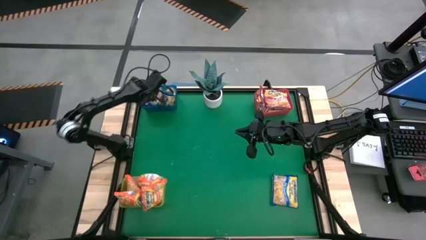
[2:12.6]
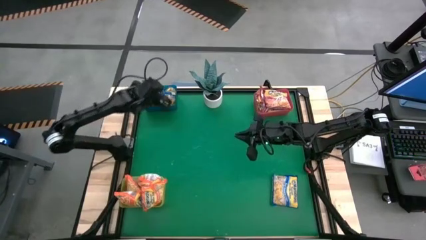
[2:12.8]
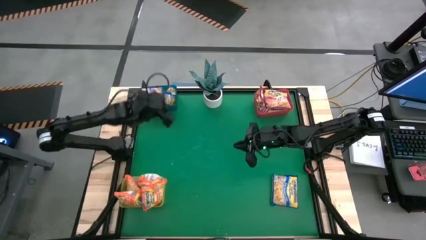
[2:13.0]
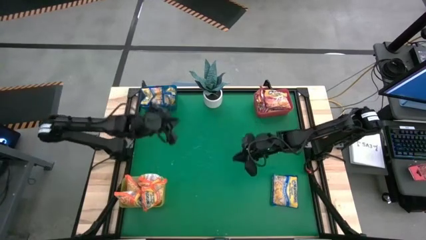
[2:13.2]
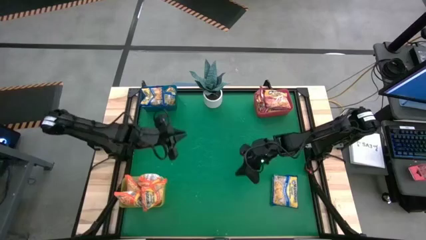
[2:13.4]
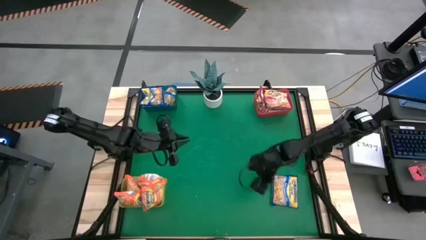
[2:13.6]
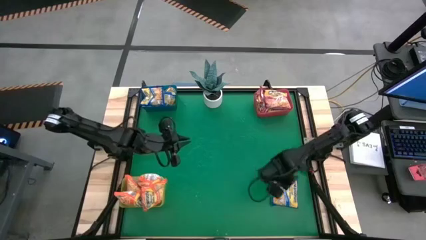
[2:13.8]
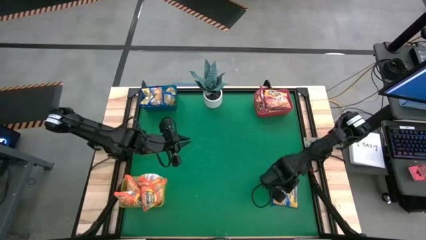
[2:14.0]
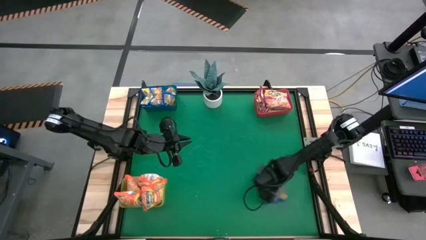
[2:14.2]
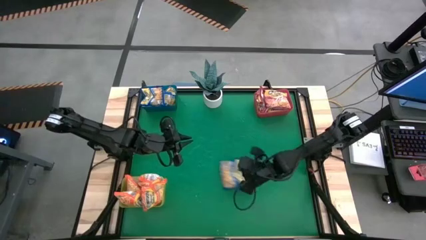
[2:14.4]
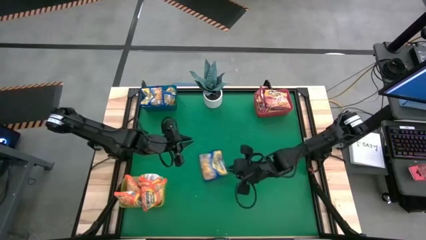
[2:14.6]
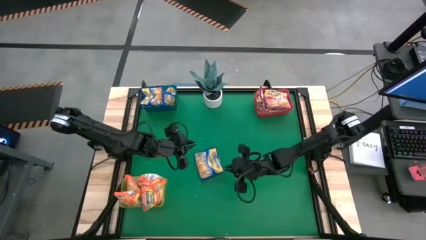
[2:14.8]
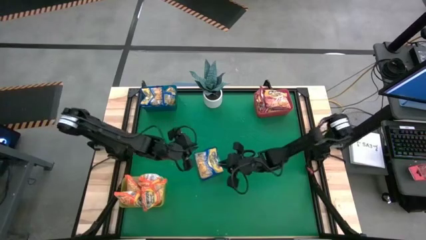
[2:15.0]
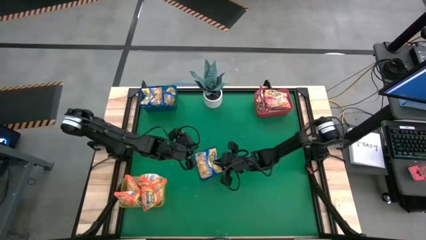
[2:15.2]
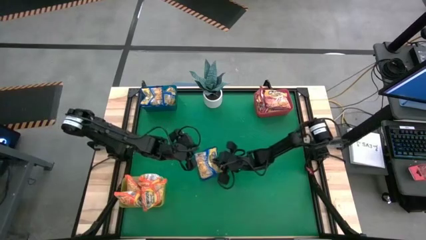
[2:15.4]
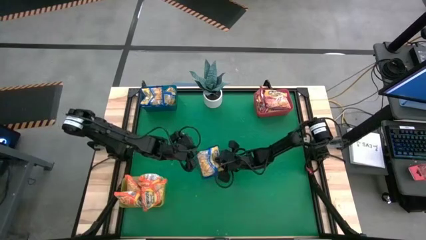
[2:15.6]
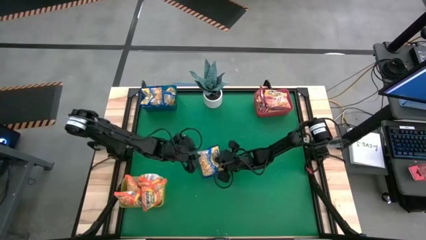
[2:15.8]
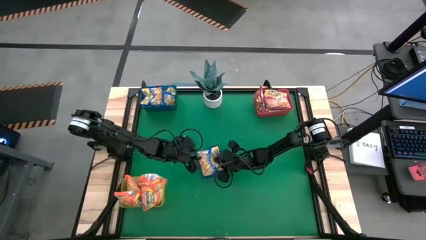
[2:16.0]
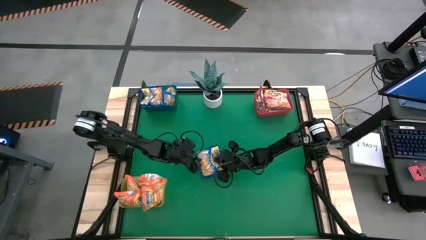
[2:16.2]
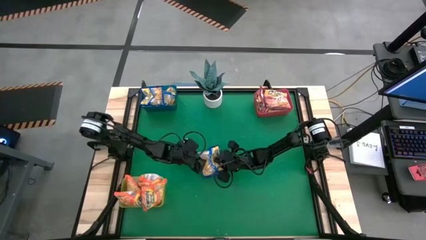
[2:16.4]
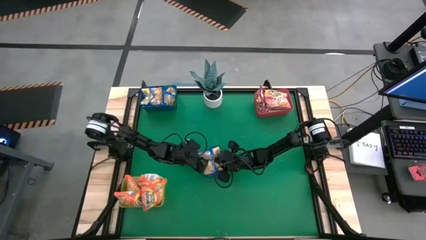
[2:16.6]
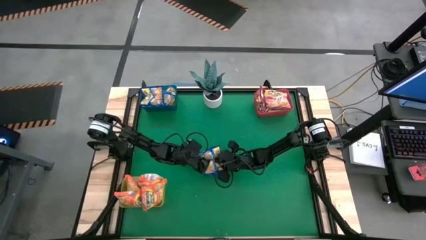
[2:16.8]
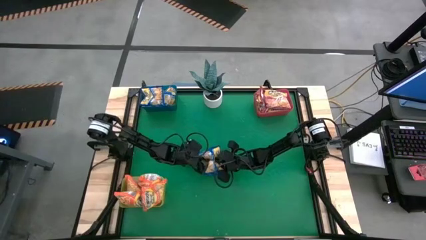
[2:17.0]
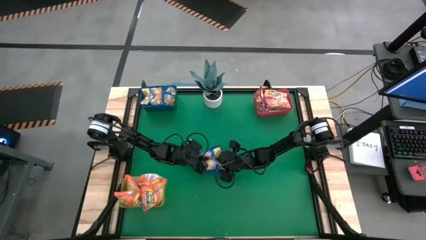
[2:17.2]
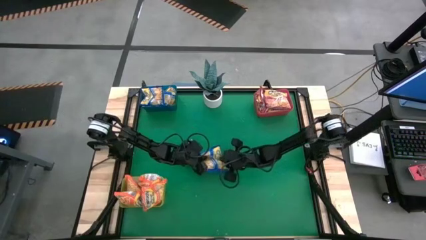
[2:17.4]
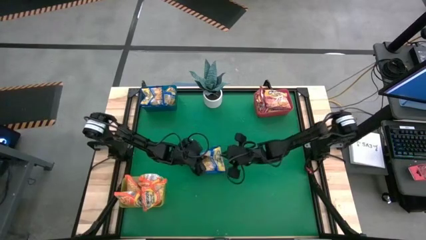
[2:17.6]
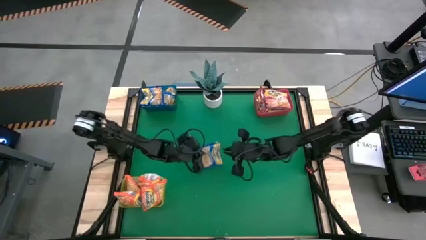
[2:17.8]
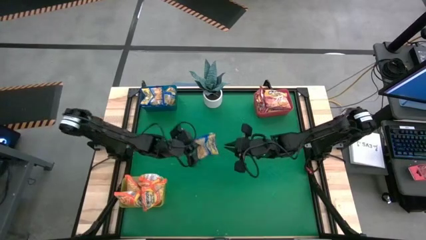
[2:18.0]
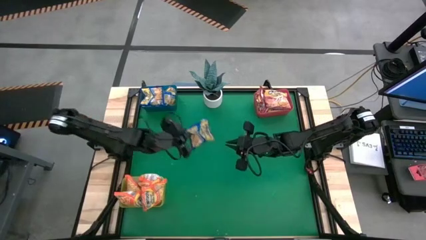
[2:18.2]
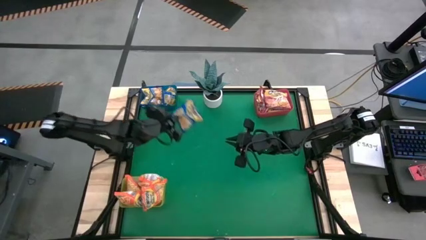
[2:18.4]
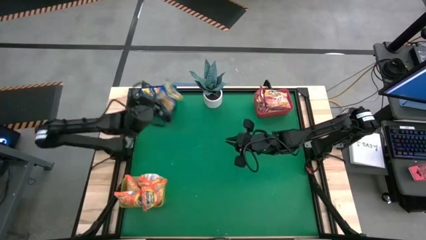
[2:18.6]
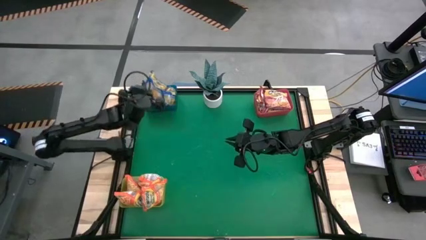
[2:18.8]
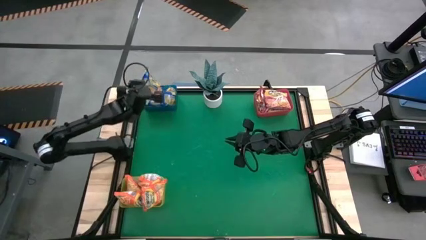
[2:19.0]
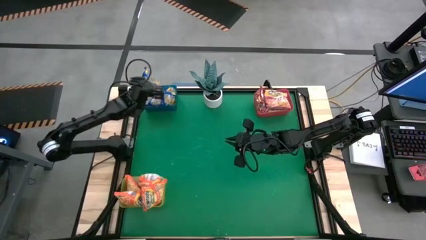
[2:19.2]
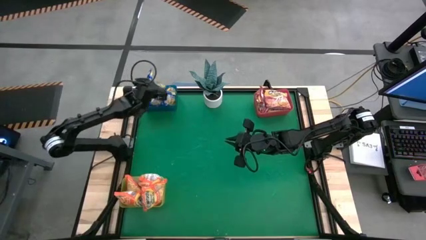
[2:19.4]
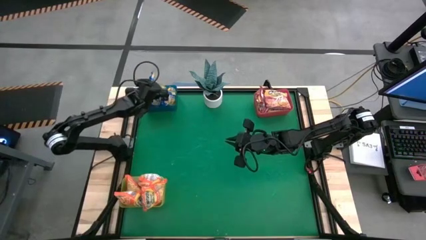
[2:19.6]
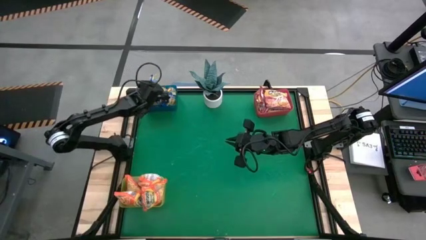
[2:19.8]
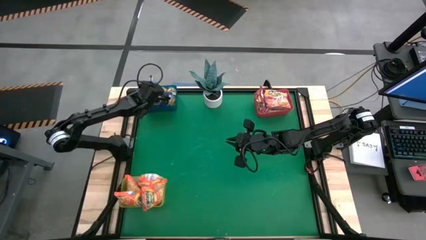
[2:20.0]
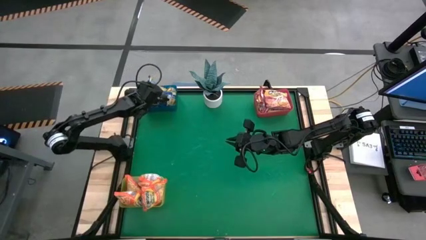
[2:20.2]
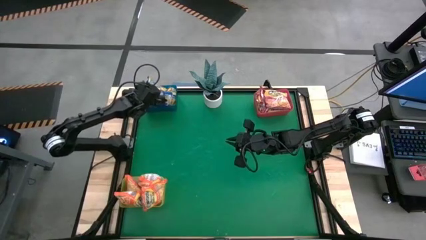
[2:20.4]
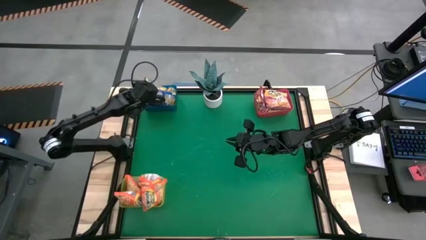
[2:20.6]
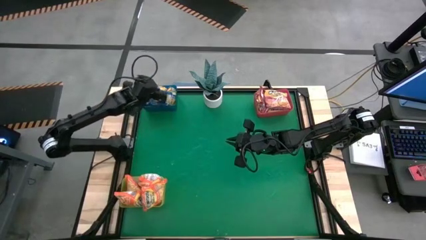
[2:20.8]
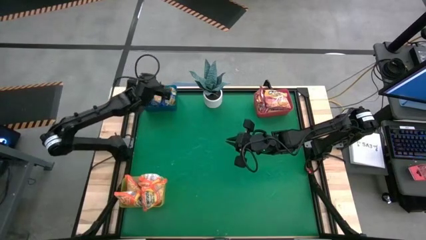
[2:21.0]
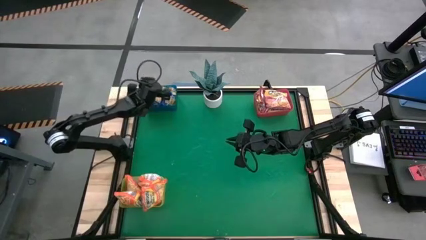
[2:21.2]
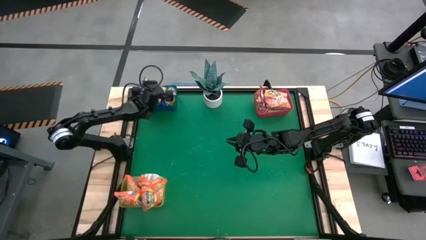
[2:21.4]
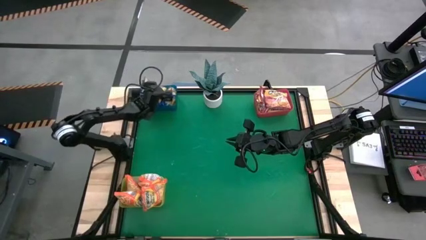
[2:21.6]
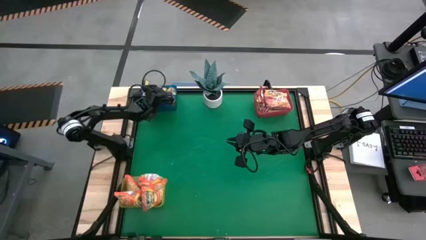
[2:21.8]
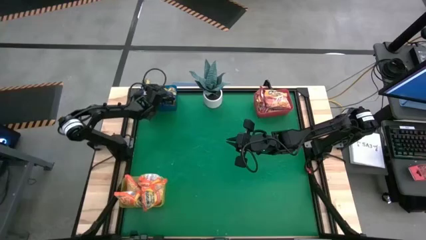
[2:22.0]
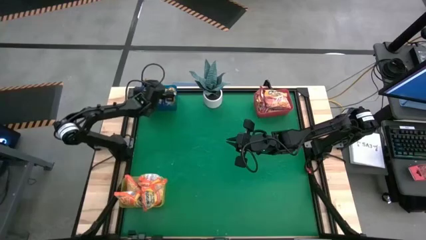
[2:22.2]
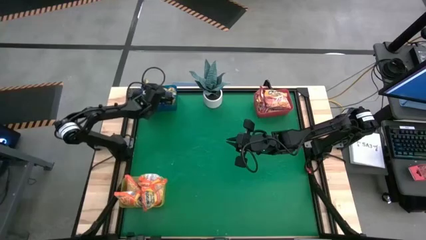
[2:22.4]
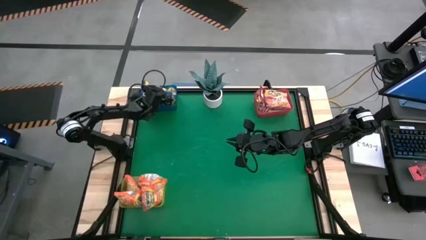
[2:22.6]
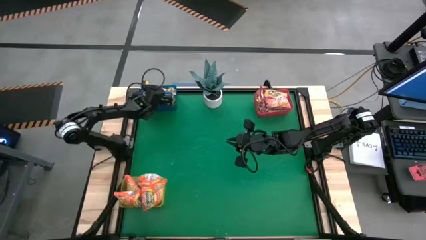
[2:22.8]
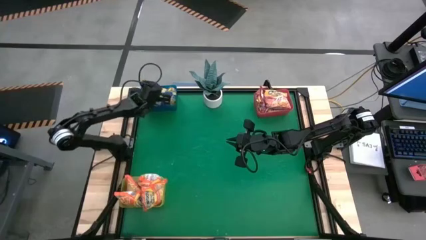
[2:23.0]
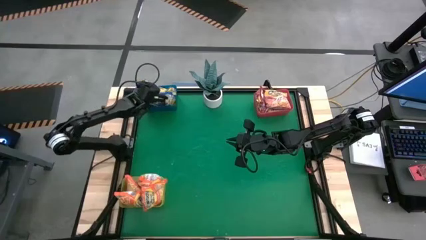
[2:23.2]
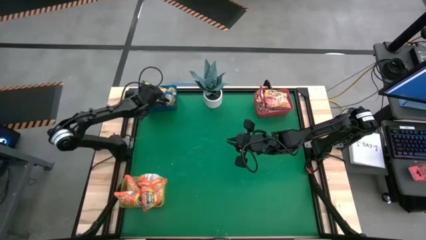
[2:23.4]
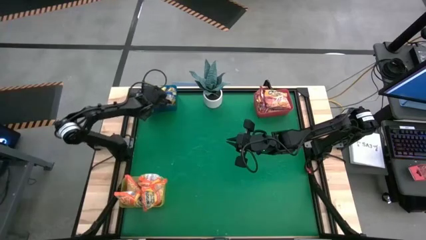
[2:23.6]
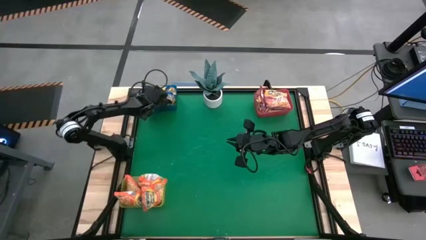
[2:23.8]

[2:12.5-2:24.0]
Task: Sort Maruchan noodles
Put the blue noodle pack into the blue bin

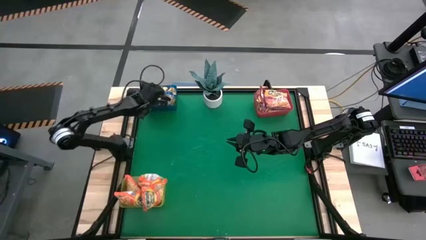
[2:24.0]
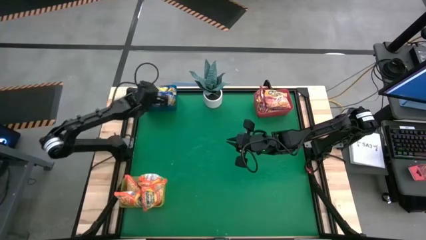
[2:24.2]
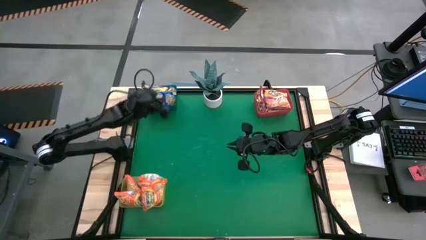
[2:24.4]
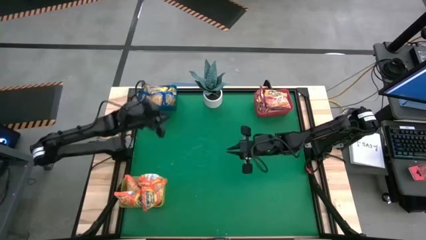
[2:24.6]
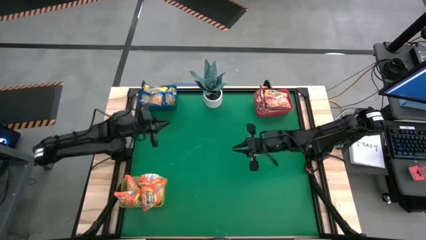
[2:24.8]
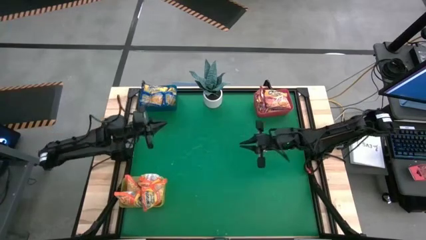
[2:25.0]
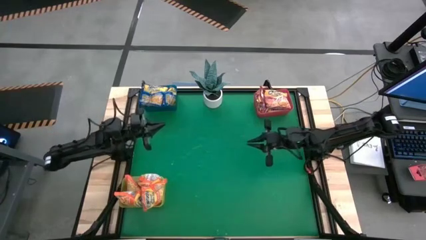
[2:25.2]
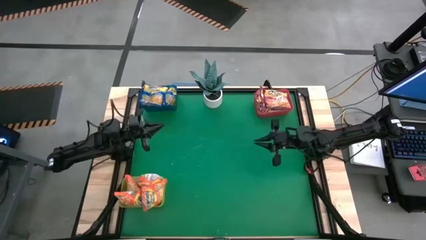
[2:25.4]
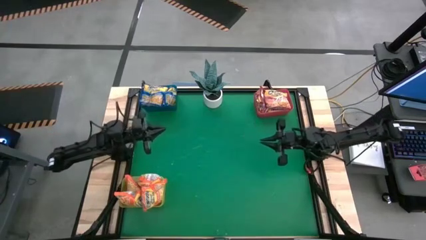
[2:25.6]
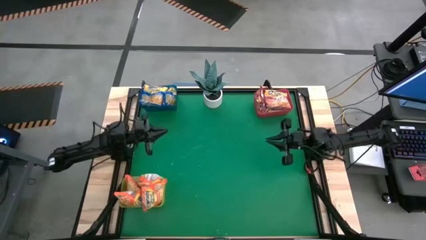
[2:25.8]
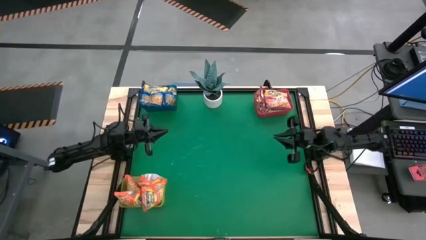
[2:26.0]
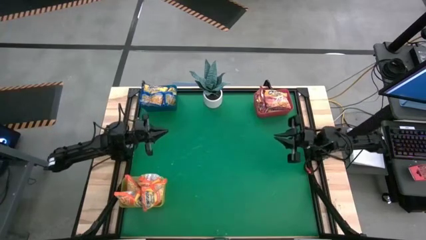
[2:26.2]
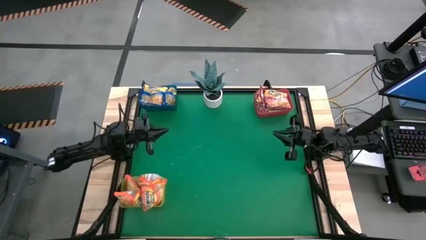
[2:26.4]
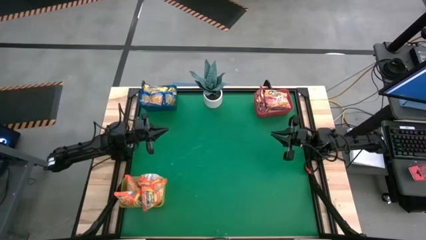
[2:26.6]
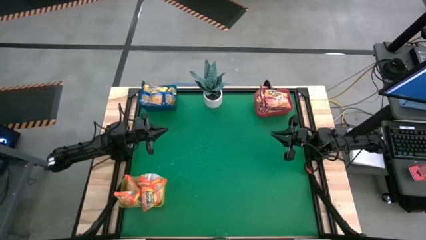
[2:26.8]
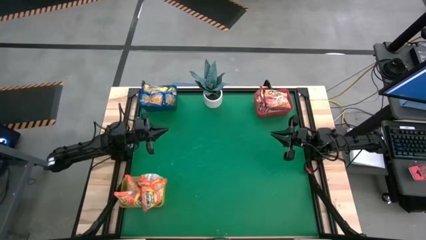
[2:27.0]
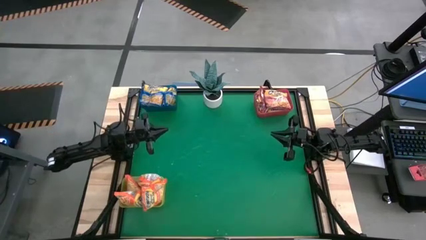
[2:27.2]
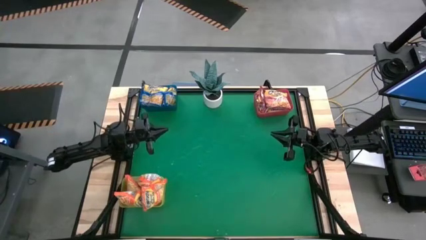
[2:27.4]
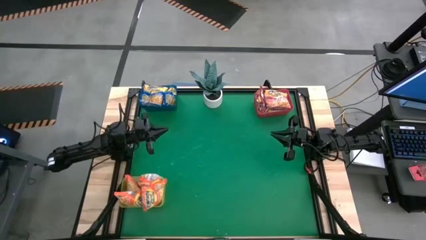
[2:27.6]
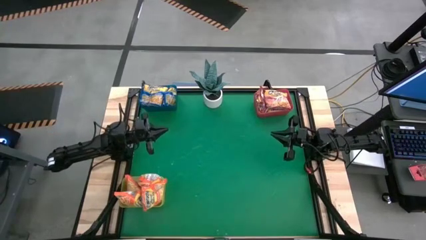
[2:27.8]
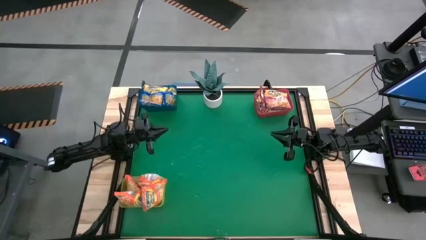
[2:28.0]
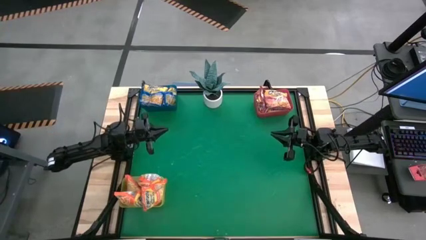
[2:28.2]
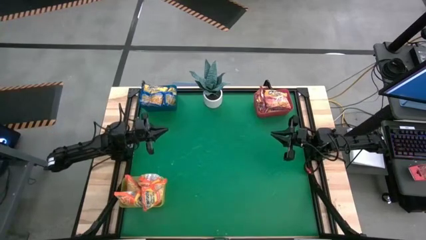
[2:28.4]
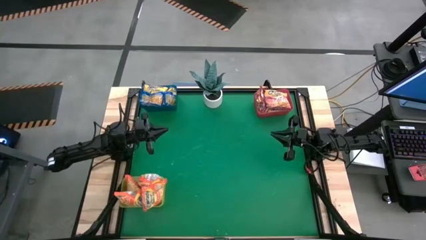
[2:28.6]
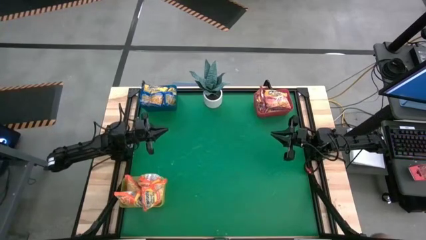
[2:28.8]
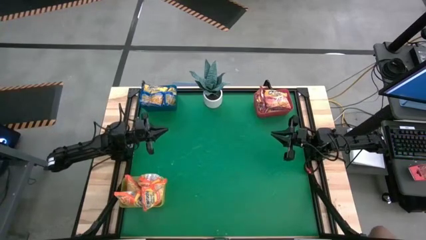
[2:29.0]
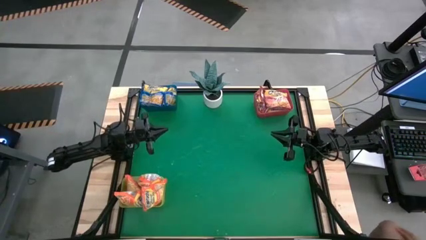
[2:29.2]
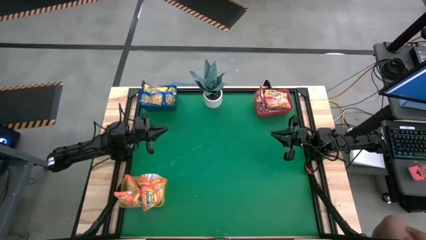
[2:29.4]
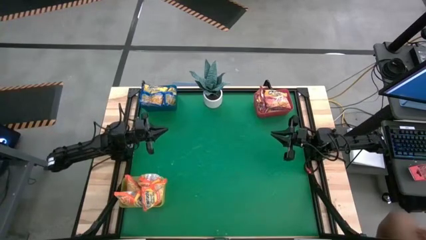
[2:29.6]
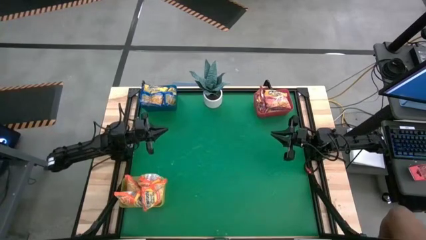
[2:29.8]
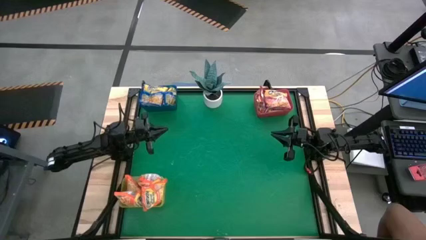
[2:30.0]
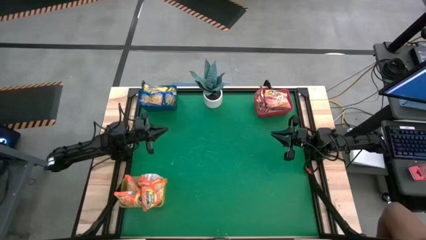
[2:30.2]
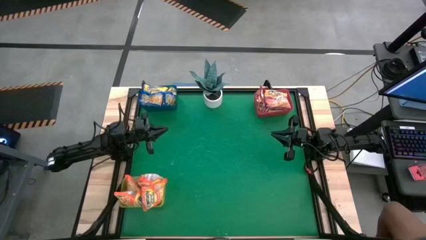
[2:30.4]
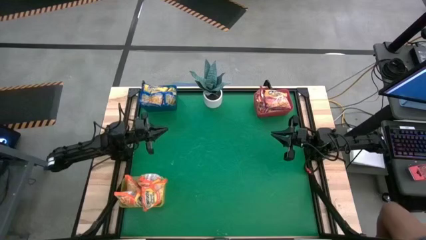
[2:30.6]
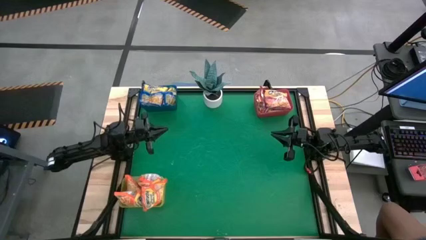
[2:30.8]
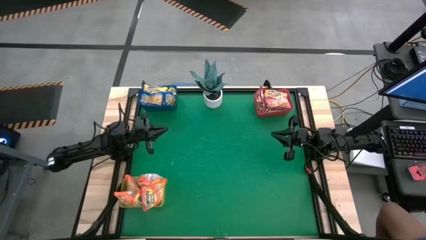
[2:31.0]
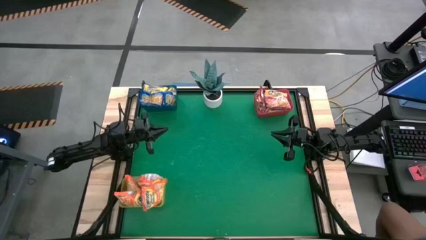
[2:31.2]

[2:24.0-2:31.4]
Return to Home Position
